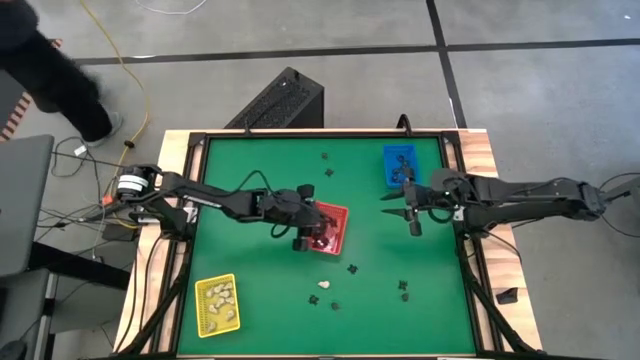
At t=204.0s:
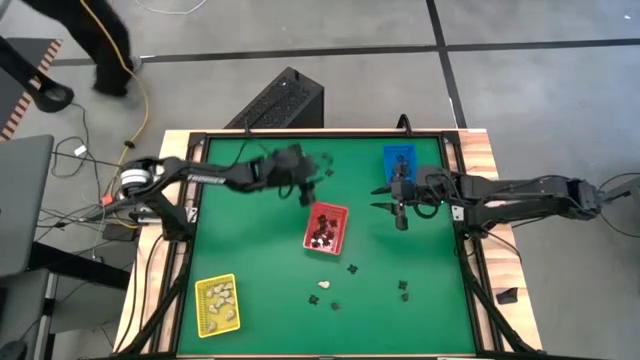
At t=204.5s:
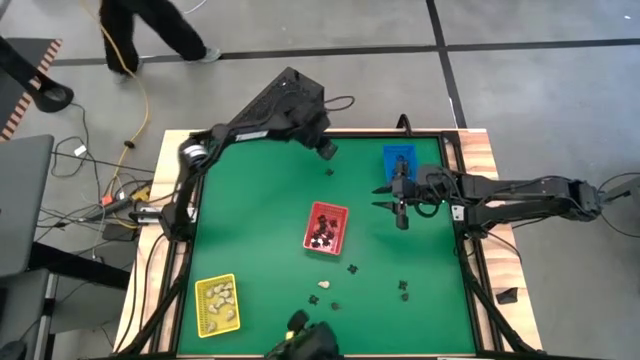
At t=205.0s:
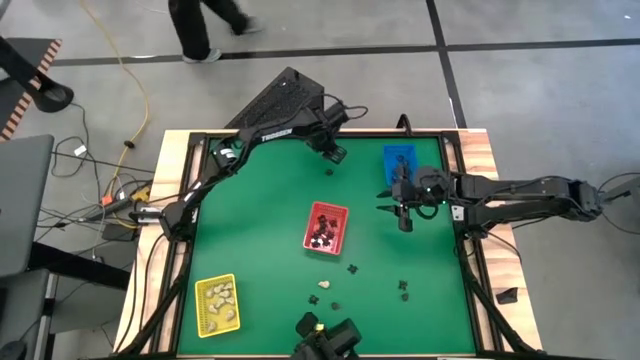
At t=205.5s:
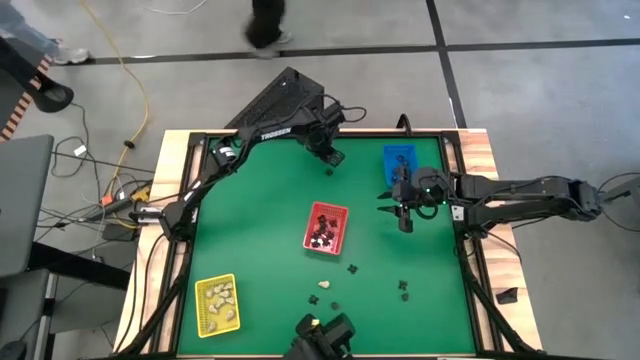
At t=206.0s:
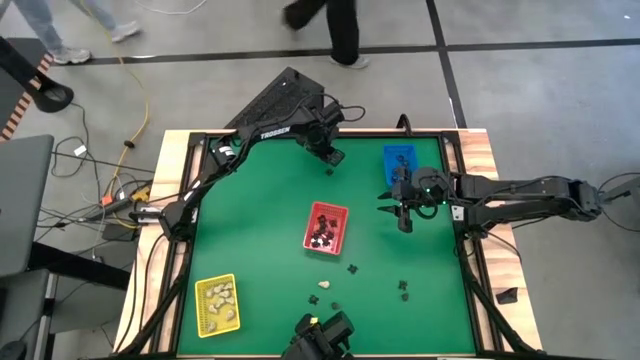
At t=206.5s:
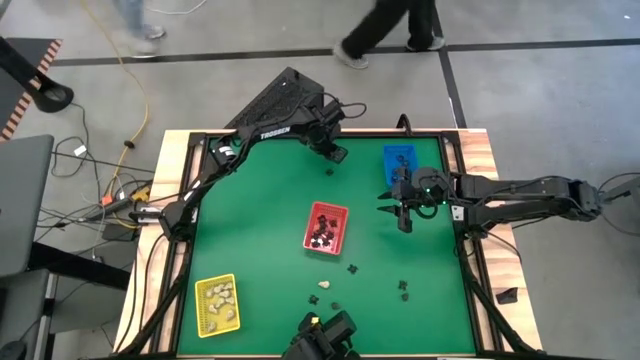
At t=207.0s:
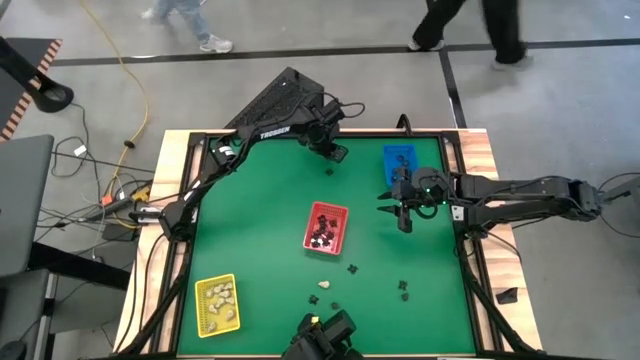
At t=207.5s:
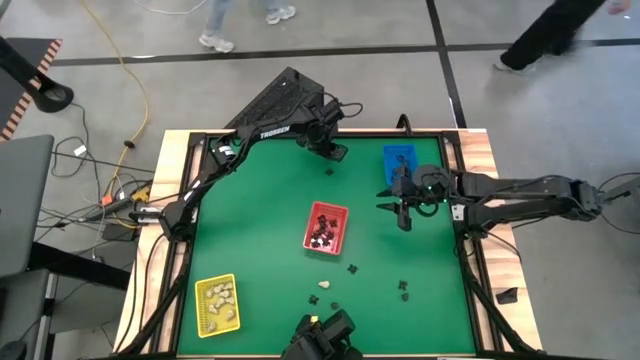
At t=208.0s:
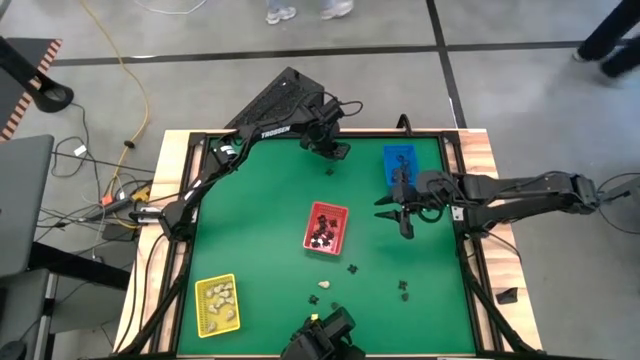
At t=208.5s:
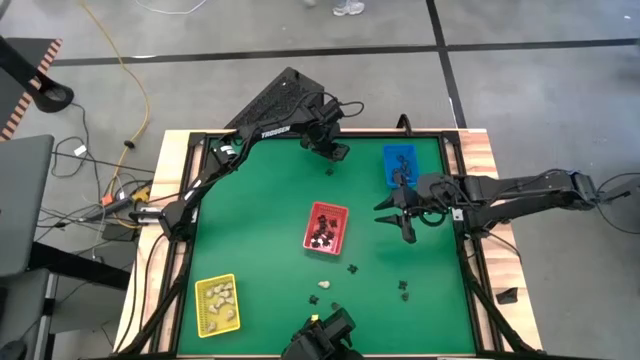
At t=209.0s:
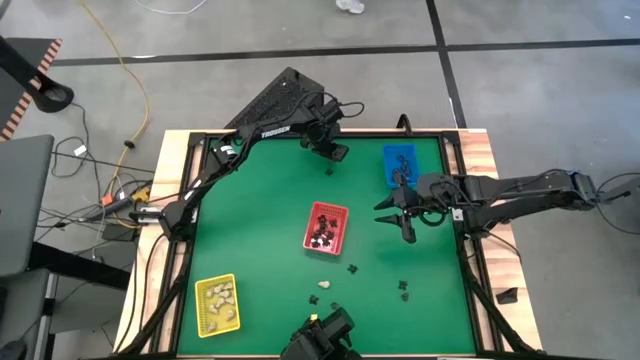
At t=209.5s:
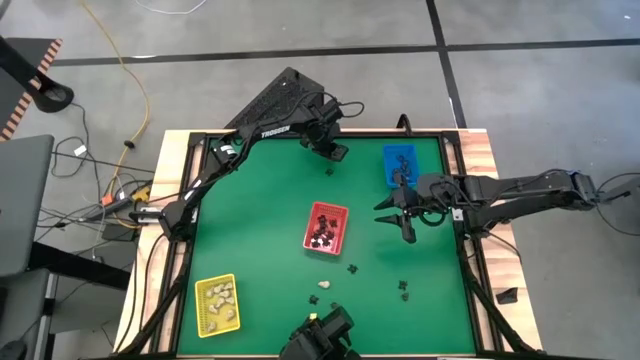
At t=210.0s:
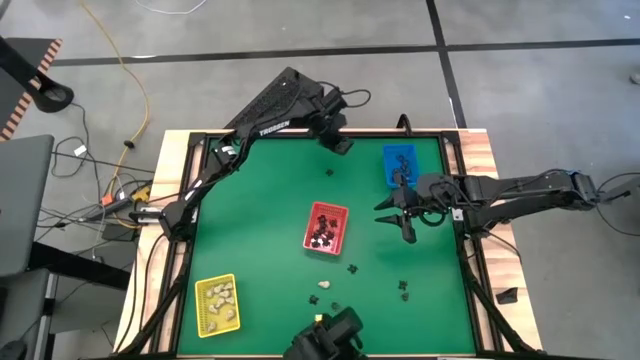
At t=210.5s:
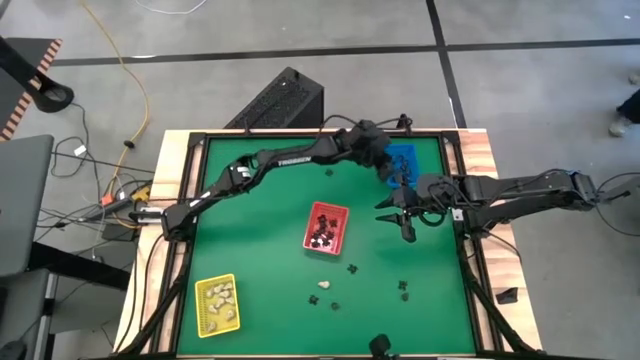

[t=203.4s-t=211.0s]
Task: Sort Halloween decoration
Put the black skull toy into the blue bin

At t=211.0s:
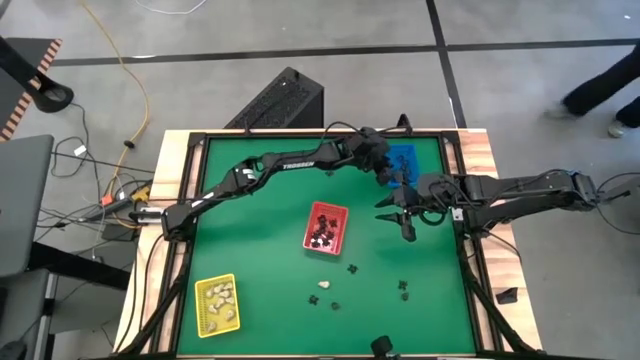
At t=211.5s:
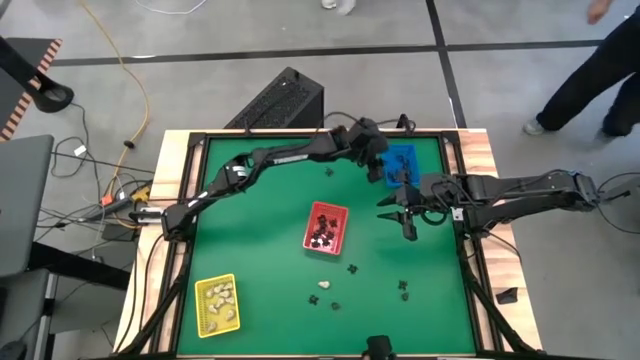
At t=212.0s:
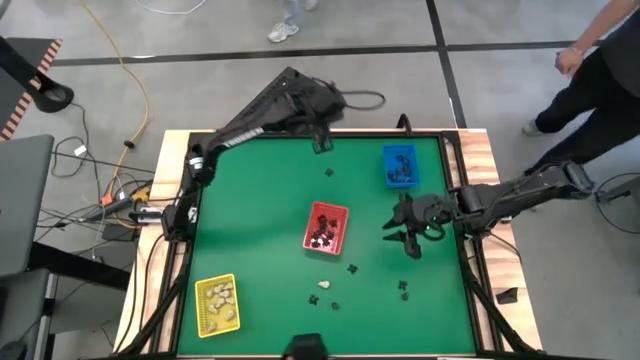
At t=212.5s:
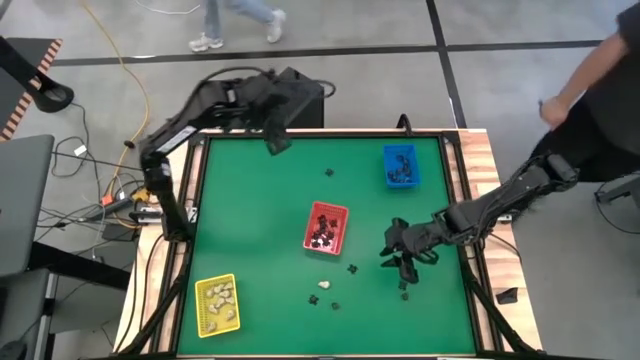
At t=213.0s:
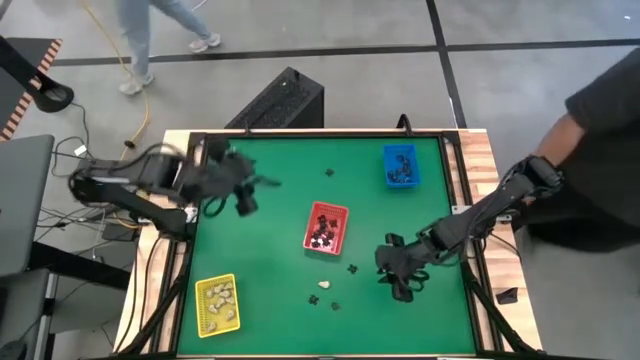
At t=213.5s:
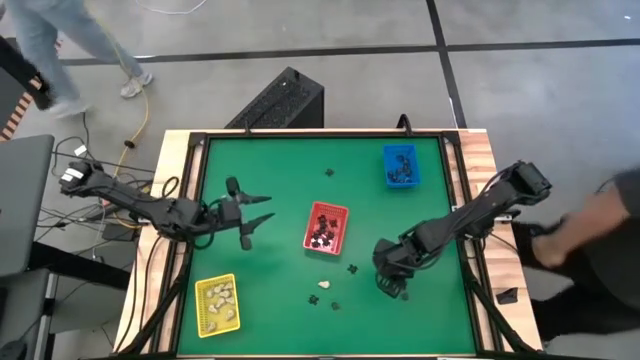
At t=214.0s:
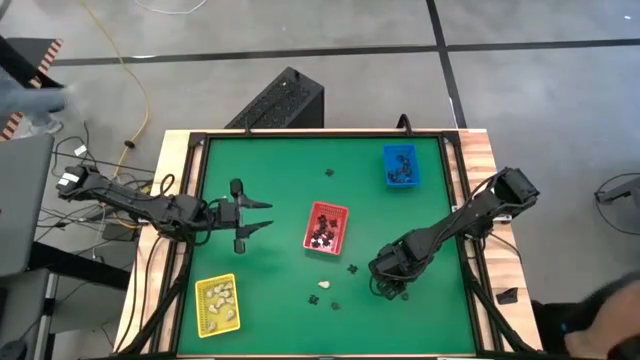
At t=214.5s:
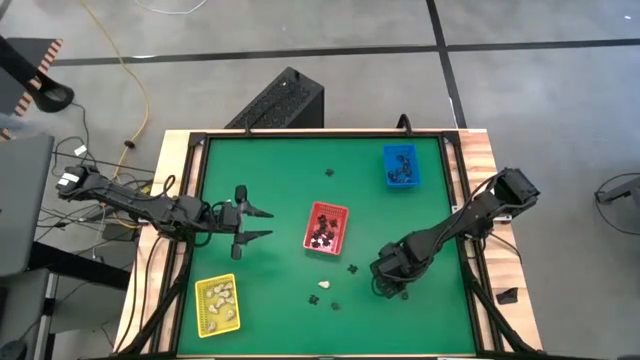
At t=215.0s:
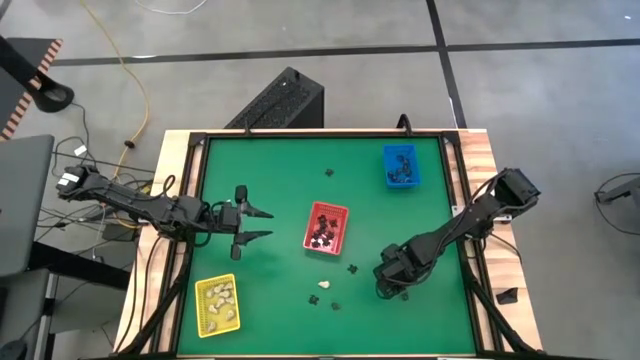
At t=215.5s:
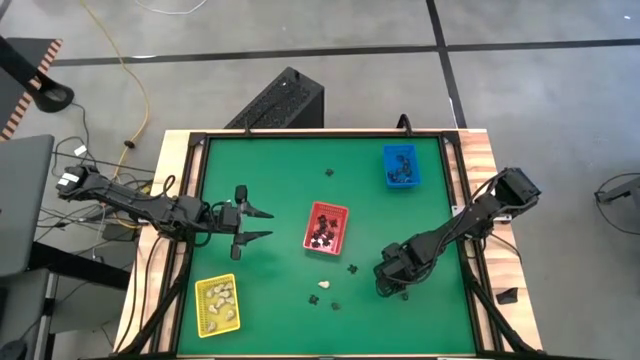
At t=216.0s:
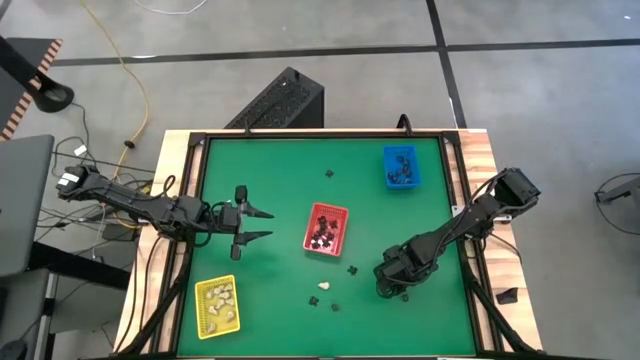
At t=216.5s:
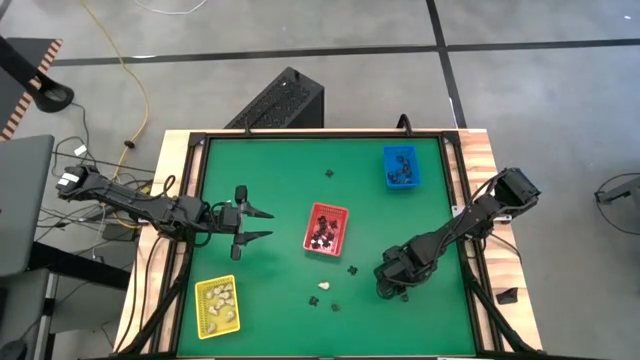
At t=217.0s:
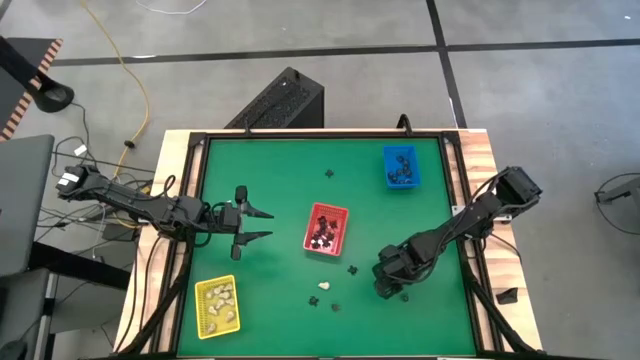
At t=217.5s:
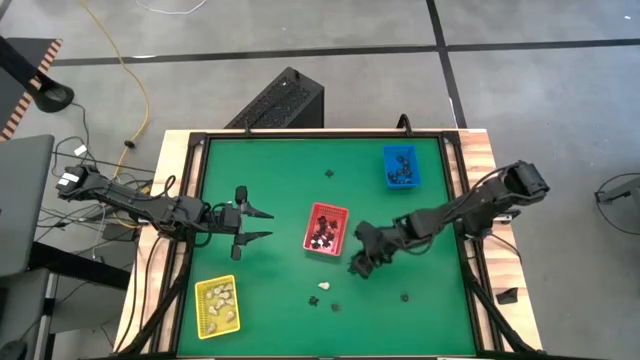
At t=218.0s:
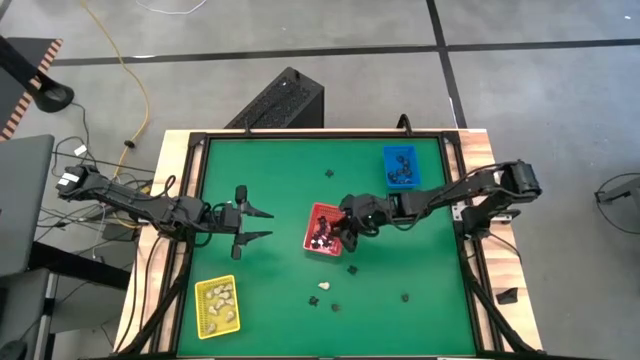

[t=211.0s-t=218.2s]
Put the black spider toy into the red bin

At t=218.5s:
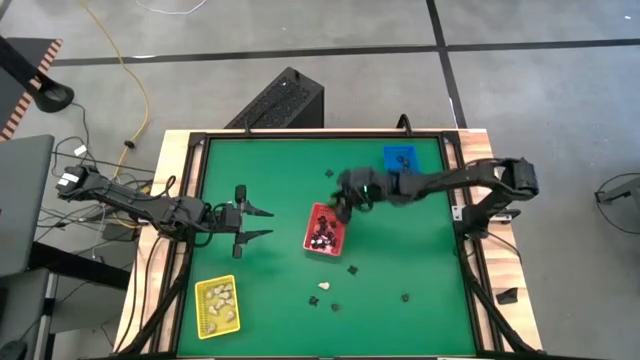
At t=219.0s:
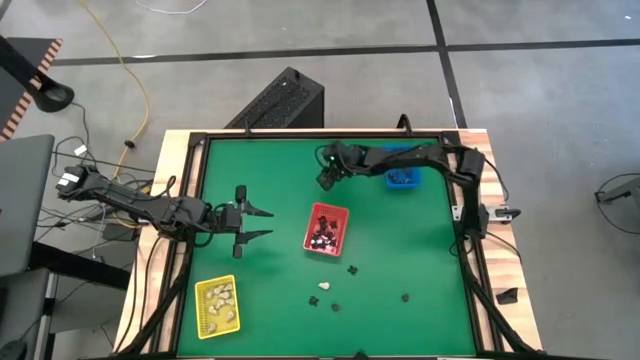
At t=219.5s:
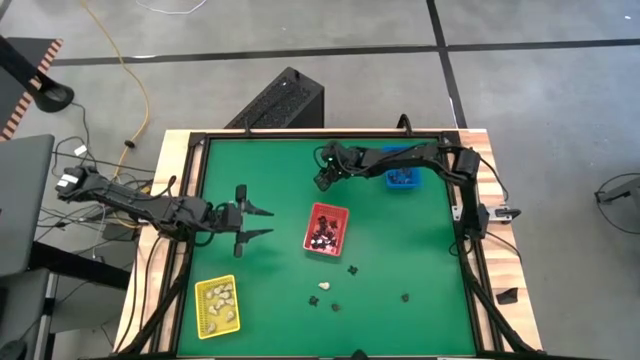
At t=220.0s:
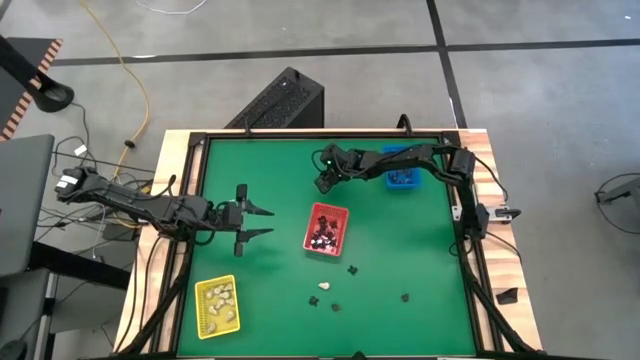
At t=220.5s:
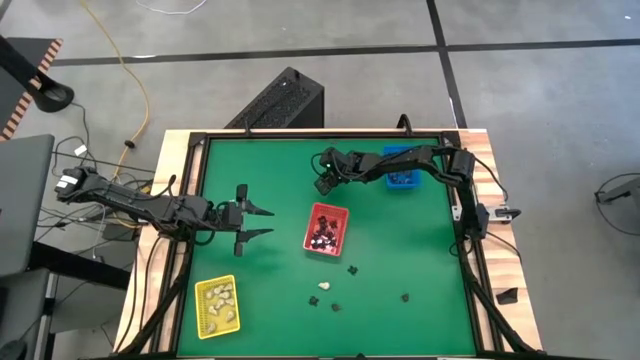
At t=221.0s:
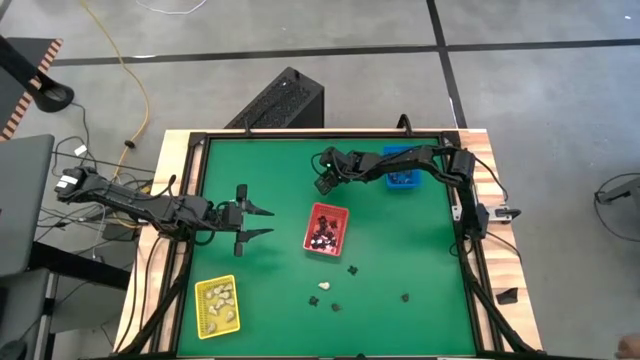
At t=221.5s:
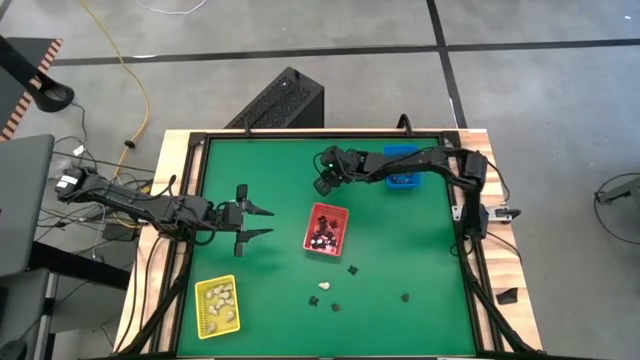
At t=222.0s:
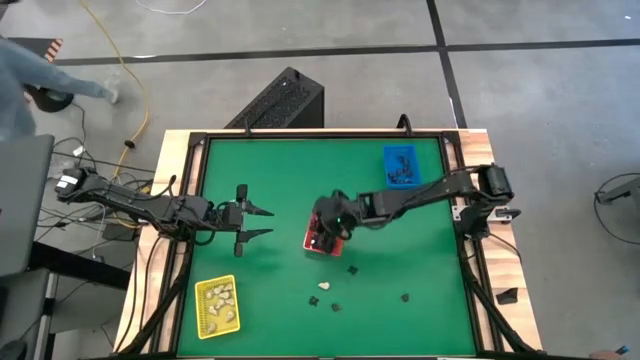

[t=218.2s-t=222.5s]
Put the black spider toy into the red bin

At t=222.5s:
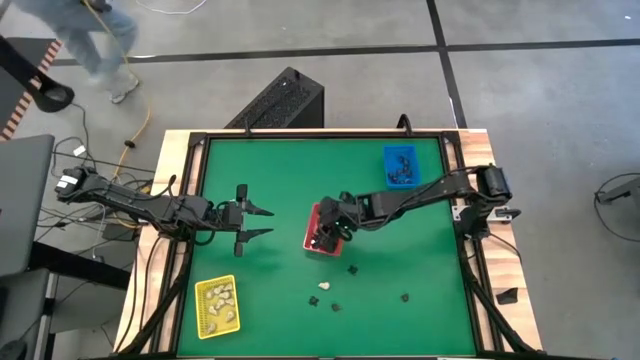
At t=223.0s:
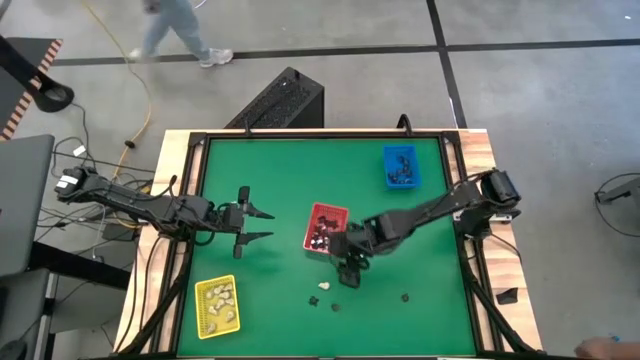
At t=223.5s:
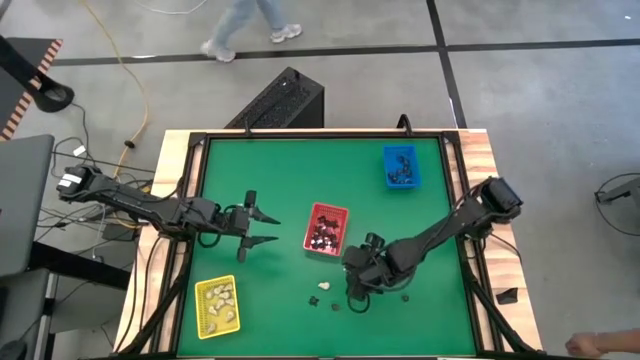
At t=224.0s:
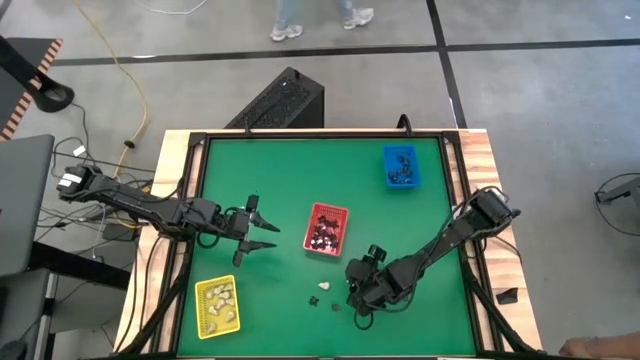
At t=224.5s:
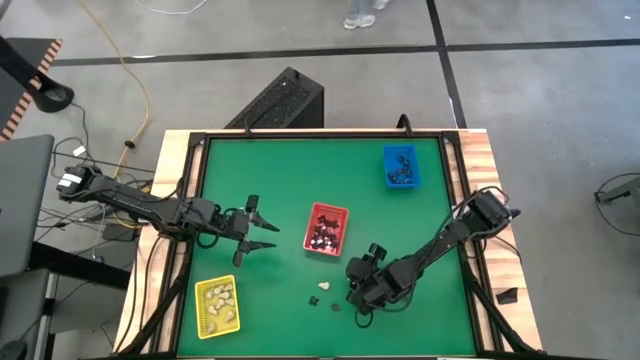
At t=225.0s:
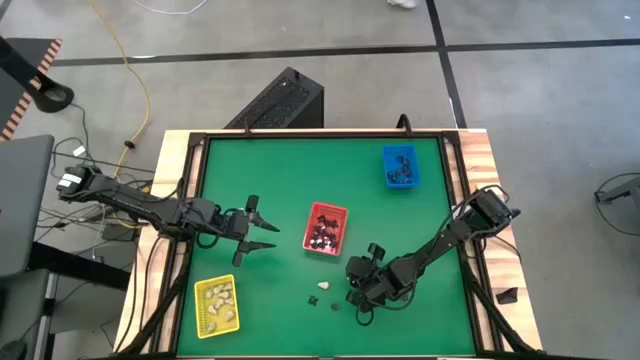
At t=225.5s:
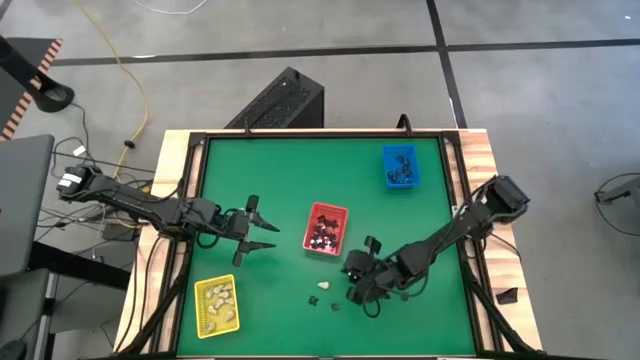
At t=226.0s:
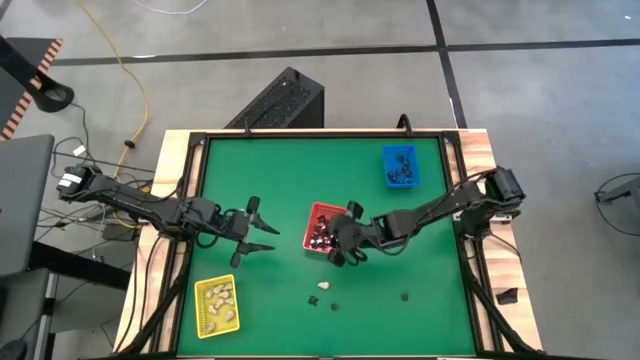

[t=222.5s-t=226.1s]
Put the black spider toy into the red bin
